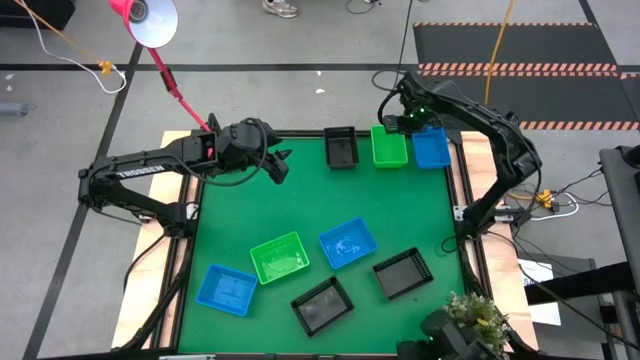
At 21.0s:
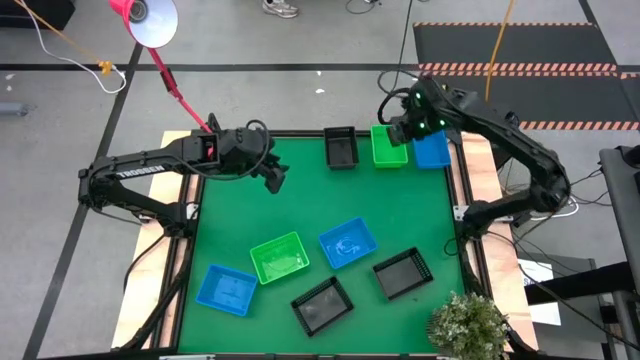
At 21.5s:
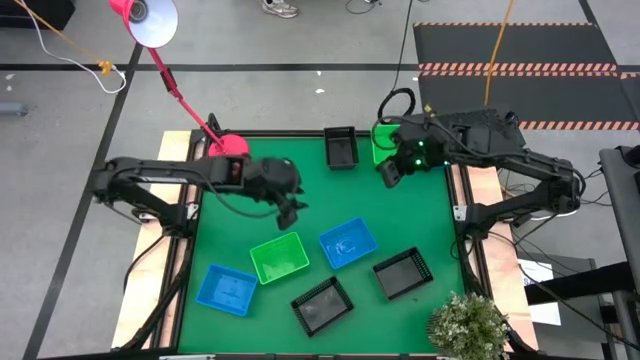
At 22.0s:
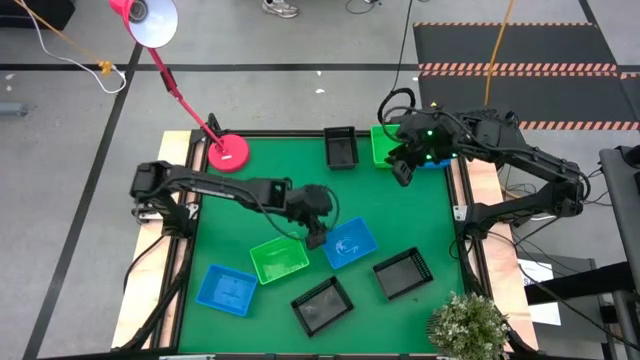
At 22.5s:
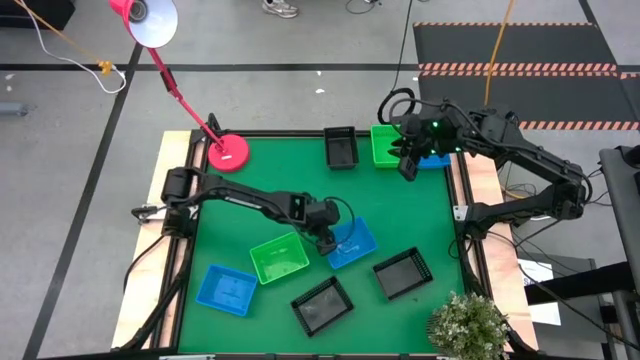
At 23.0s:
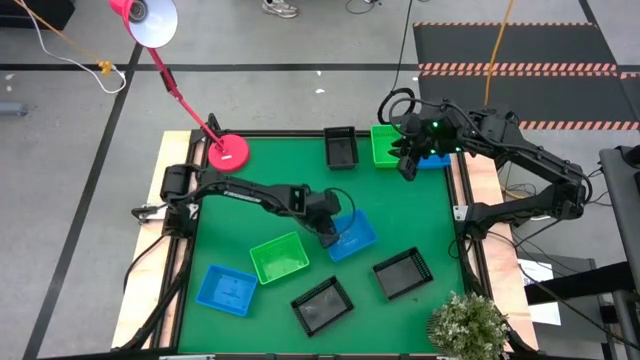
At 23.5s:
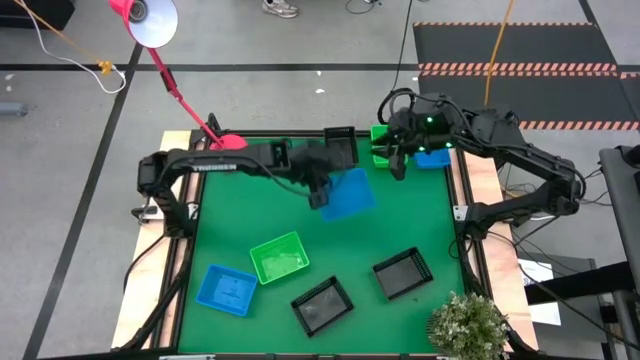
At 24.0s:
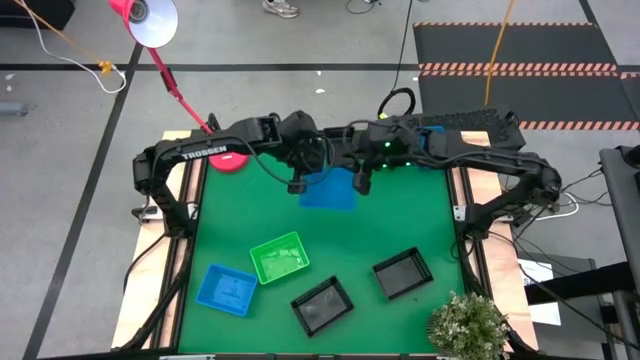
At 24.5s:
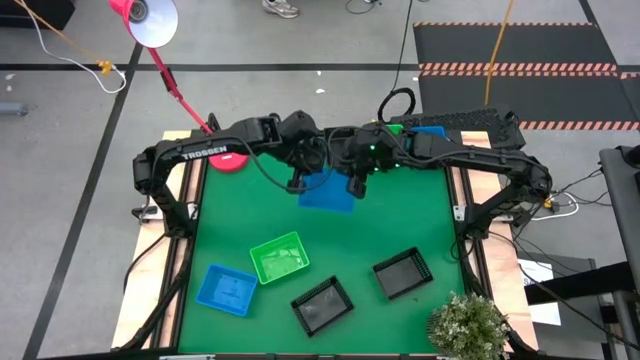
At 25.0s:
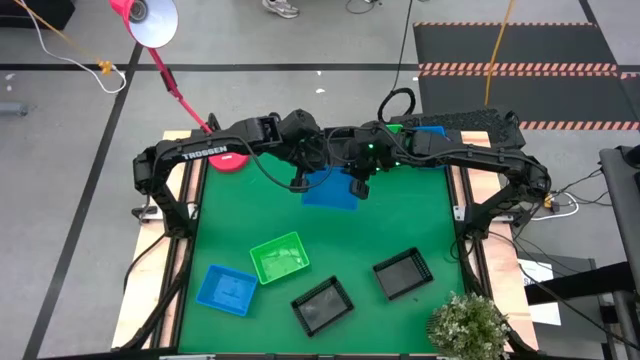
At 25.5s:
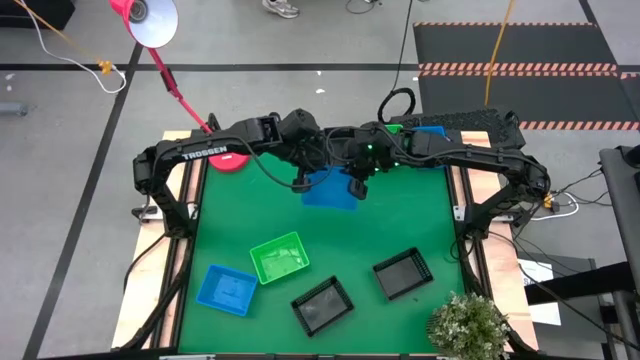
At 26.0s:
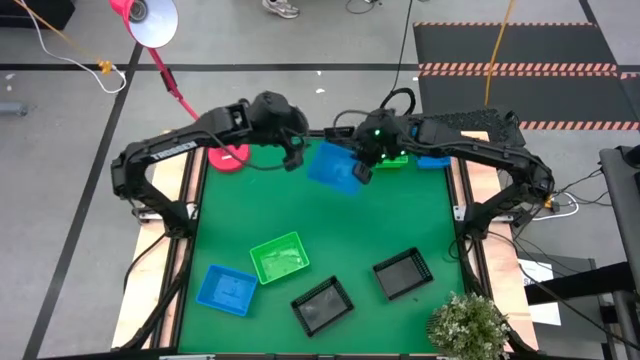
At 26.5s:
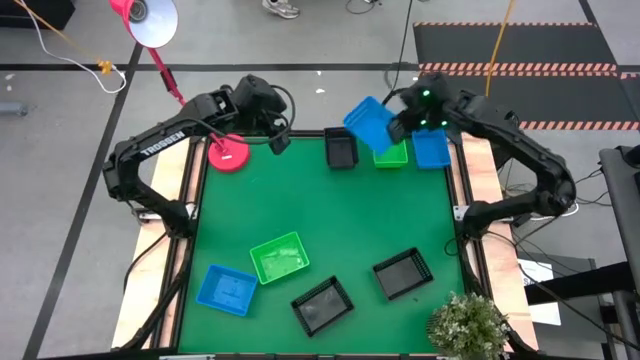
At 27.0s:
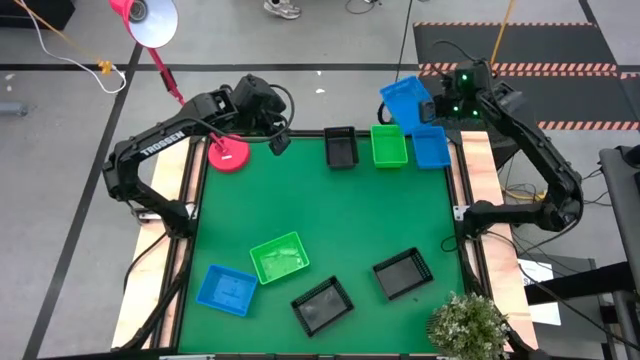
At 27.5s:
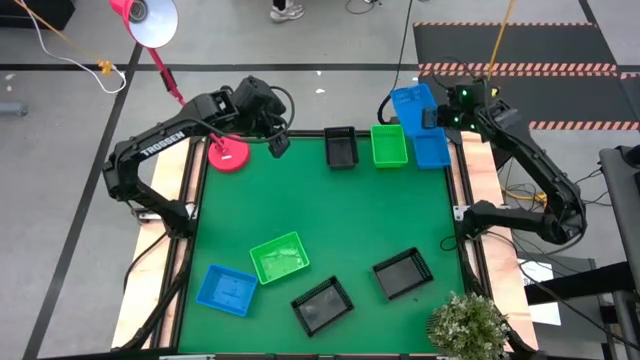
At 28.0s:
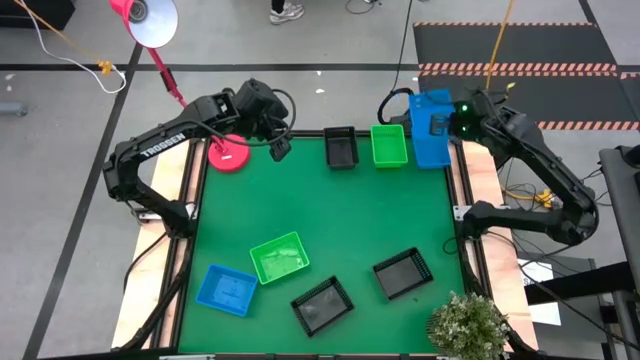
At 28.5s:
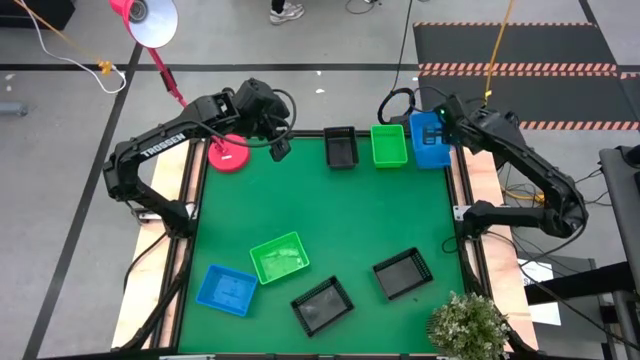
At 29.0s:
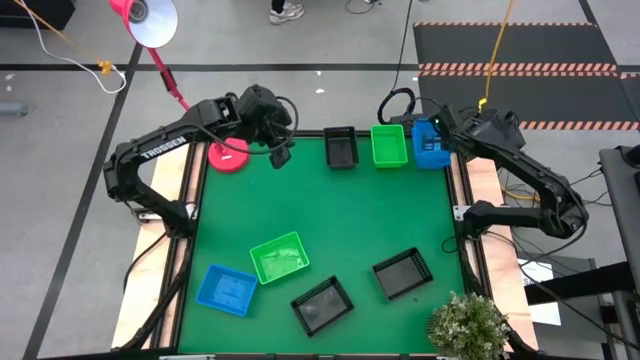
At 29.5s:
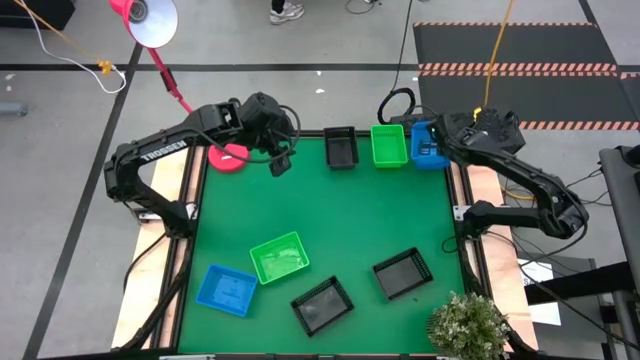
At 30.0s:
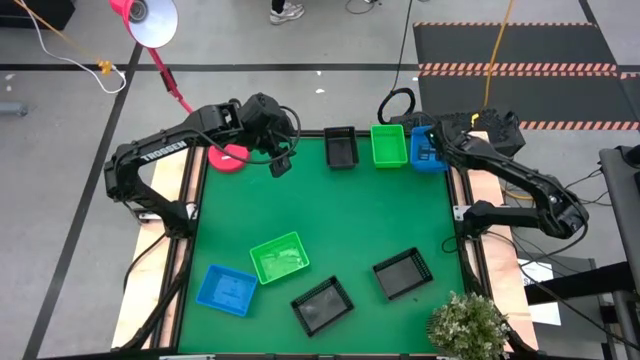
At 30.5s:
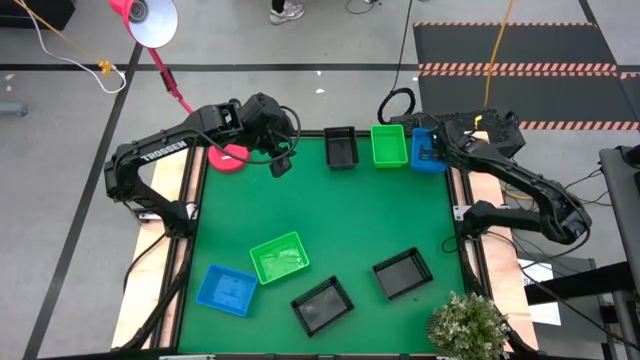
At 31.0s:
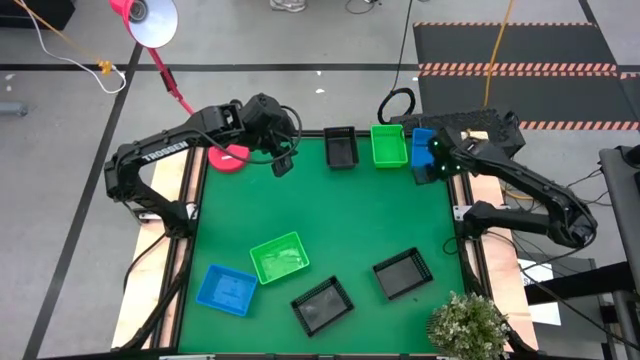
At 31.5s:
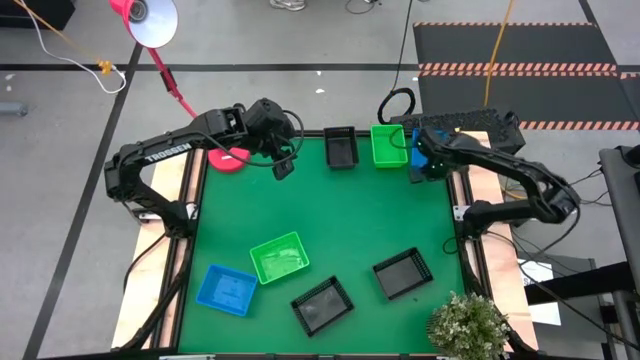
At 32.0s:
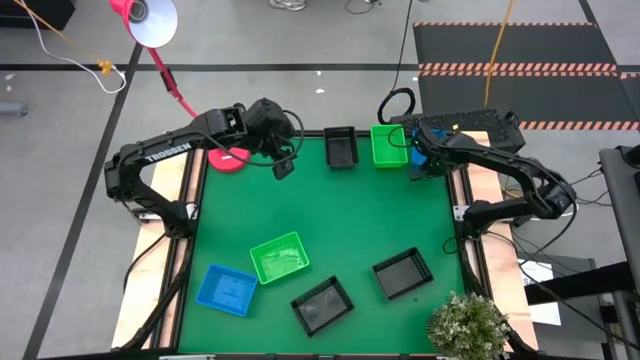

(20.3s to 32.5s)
Stack the middle blue bin on the top blue bin

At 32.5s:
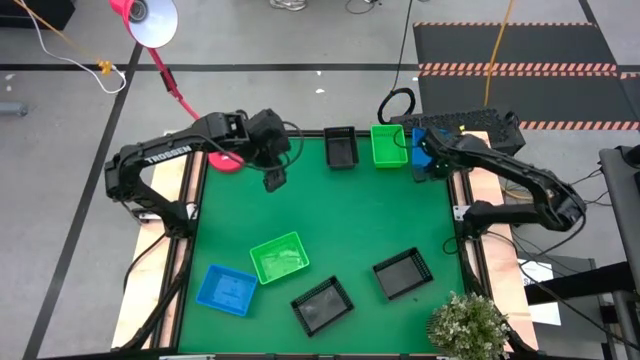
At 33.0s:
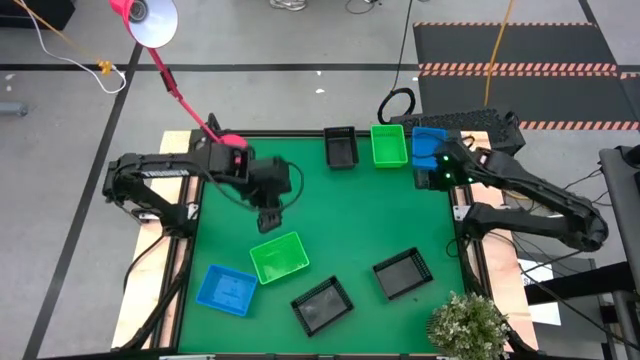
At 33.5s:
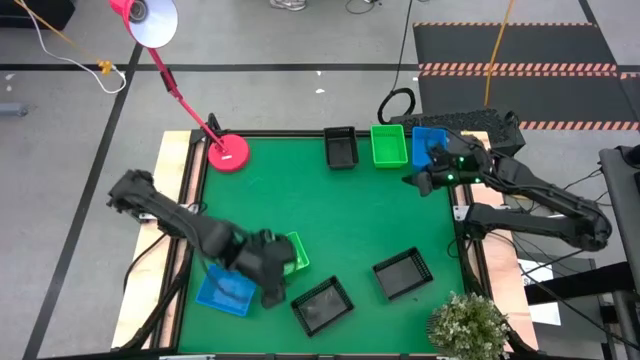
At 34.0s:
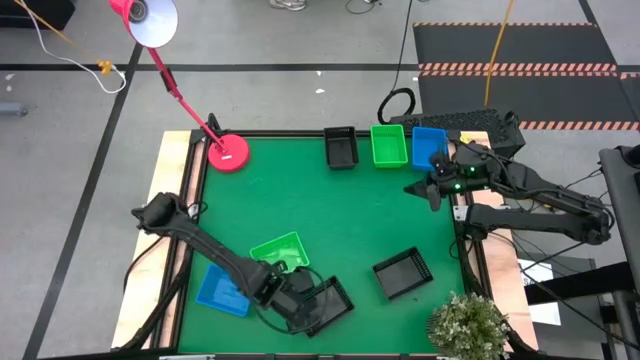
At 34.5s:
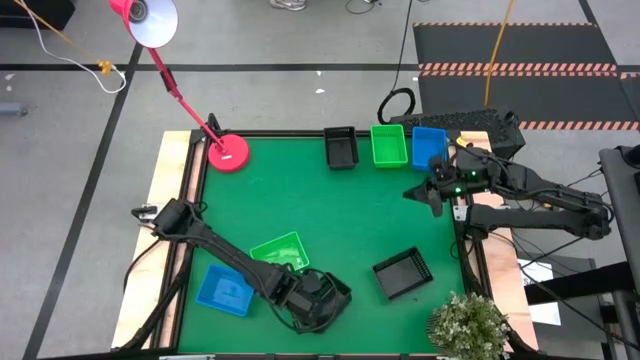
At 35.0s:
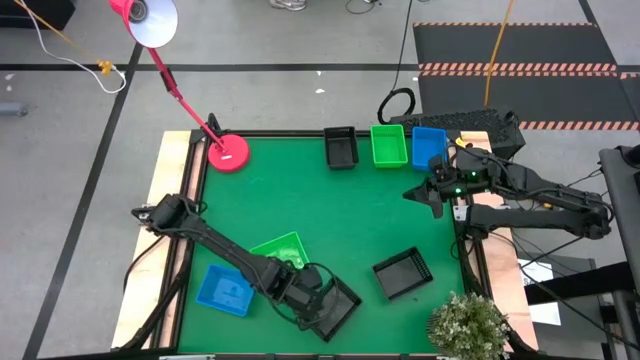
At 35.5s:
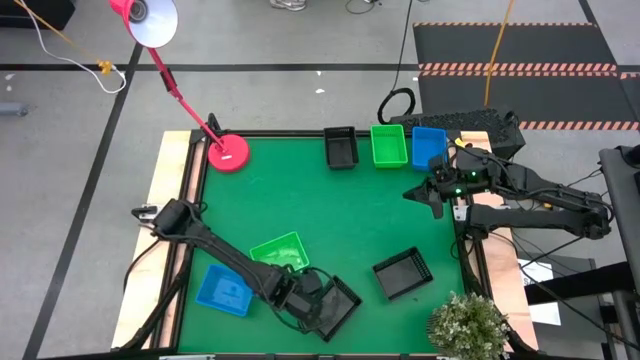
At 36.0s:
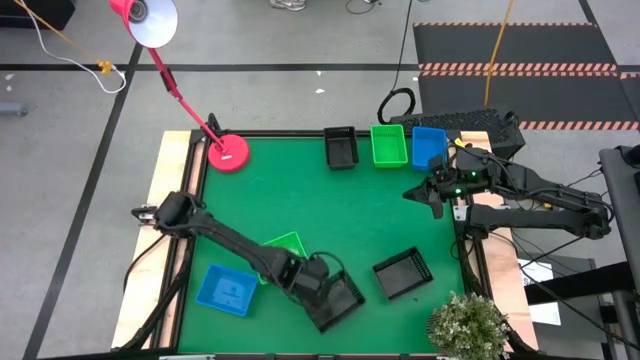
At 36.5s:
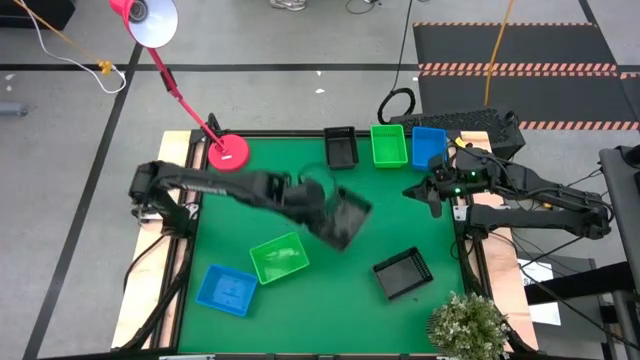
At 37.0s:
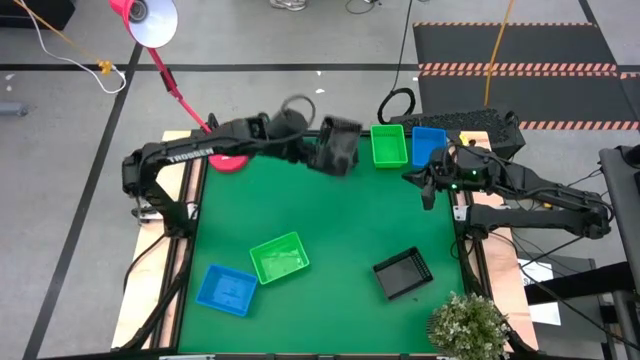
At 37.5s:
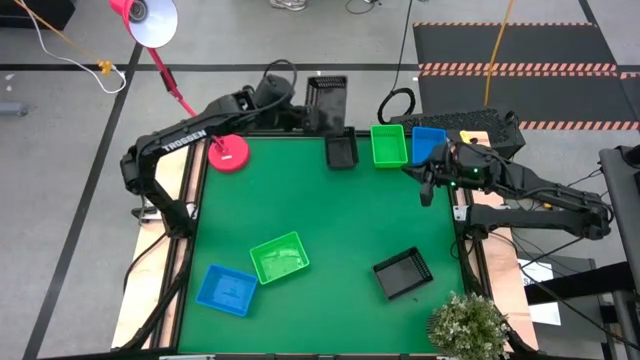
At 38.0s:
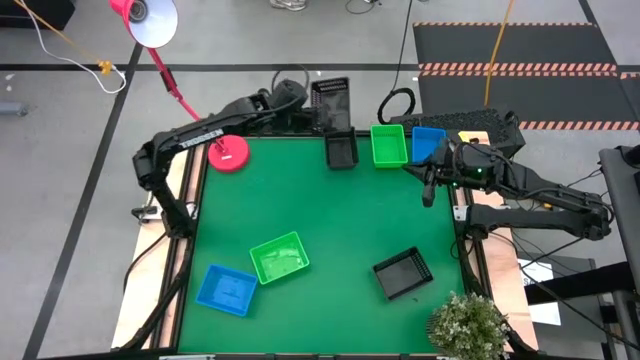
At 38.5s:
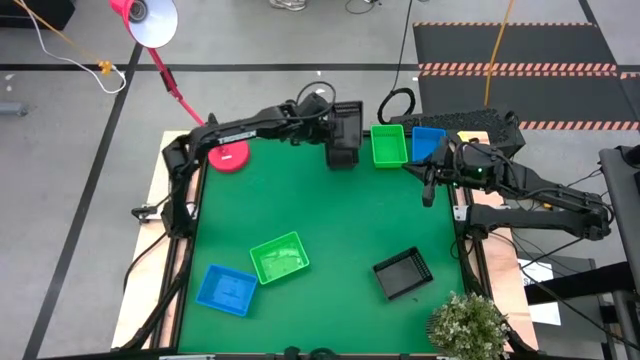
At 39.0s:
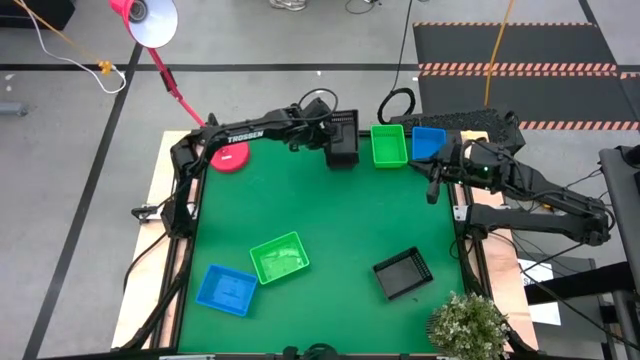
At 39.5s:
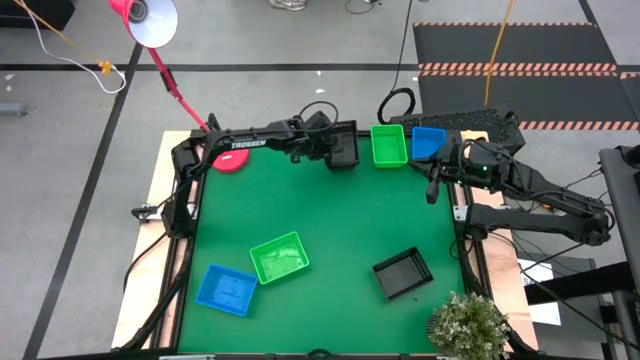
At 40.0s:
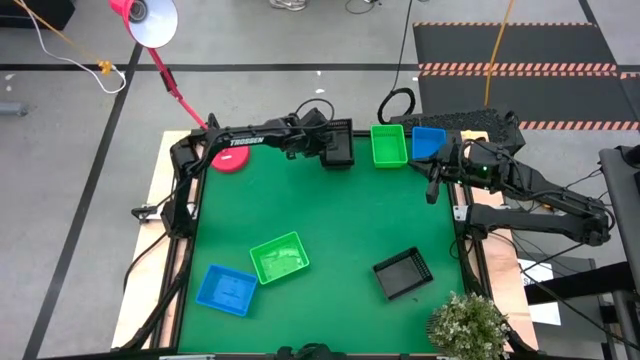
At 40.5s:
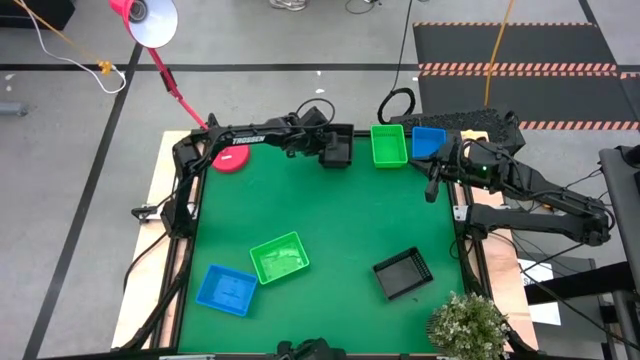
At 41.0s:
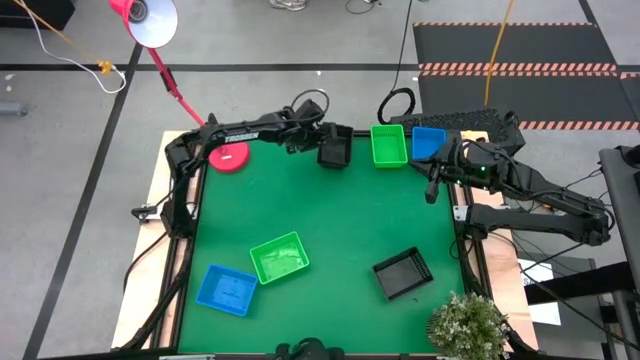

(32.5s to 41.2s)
Stack the left black bin on the top black bin
